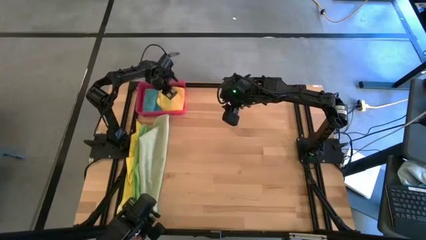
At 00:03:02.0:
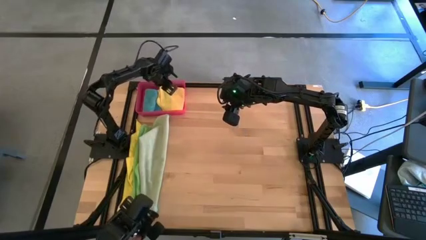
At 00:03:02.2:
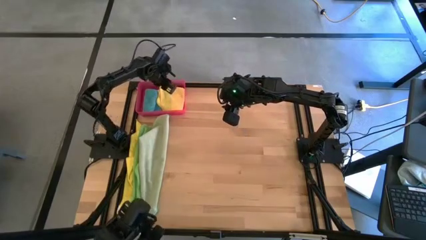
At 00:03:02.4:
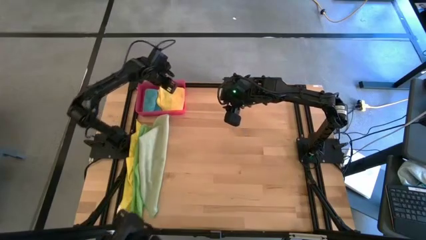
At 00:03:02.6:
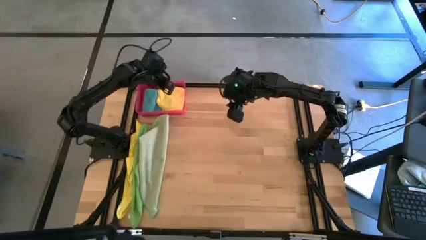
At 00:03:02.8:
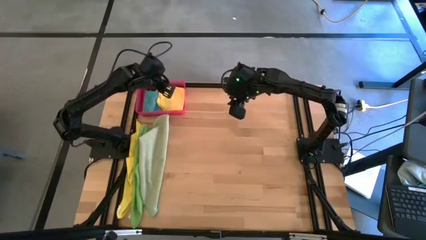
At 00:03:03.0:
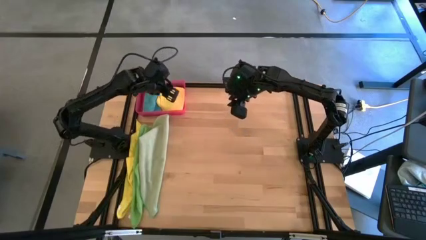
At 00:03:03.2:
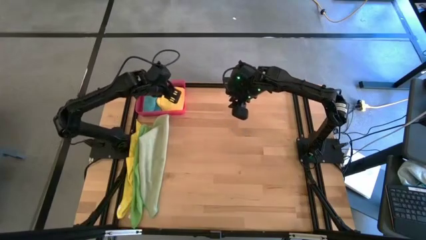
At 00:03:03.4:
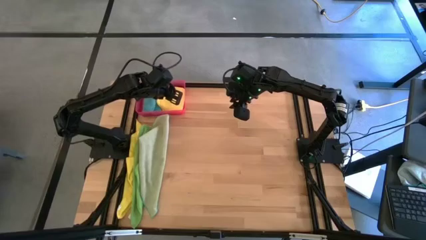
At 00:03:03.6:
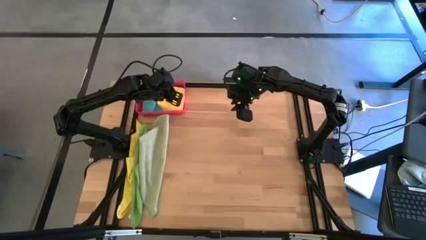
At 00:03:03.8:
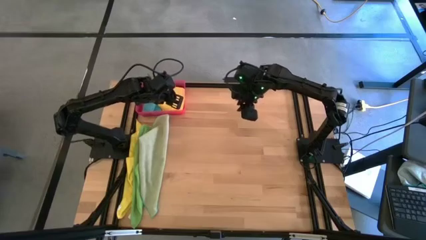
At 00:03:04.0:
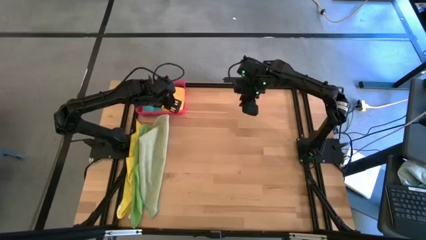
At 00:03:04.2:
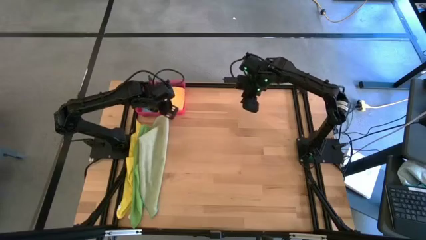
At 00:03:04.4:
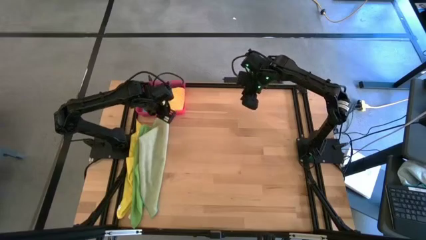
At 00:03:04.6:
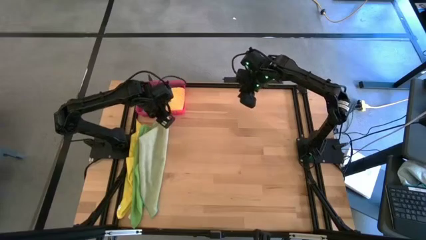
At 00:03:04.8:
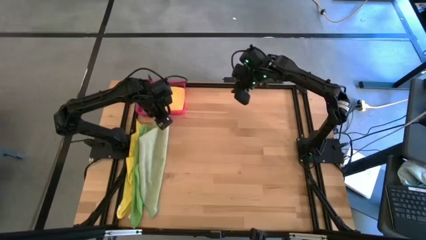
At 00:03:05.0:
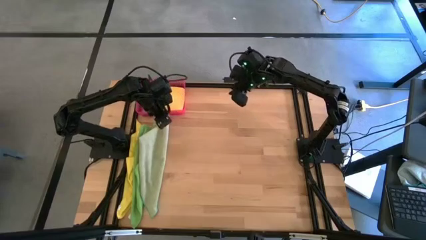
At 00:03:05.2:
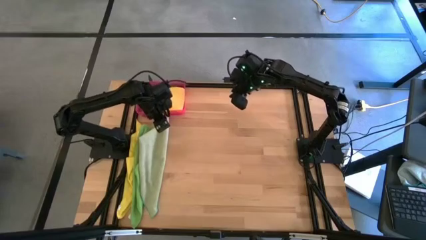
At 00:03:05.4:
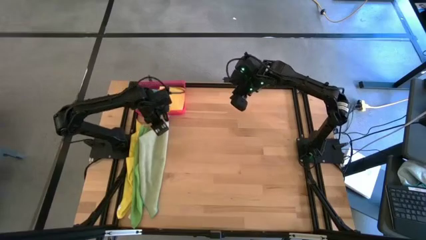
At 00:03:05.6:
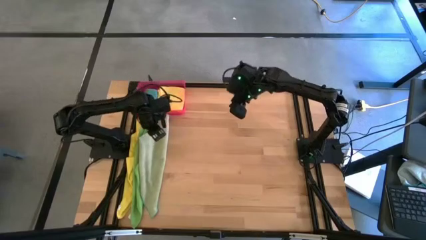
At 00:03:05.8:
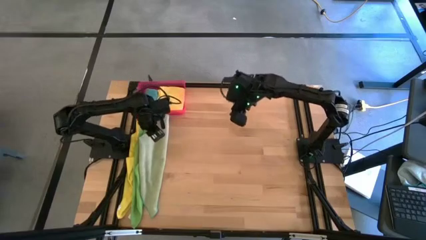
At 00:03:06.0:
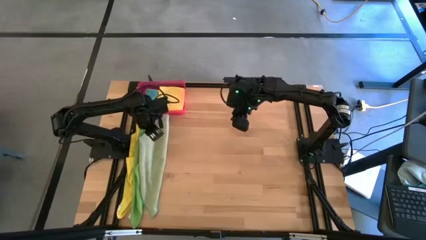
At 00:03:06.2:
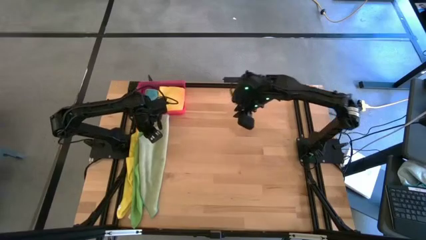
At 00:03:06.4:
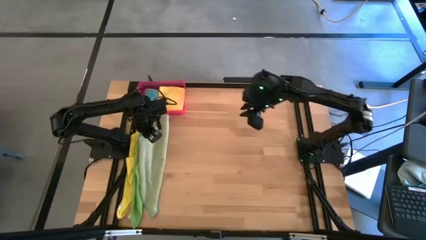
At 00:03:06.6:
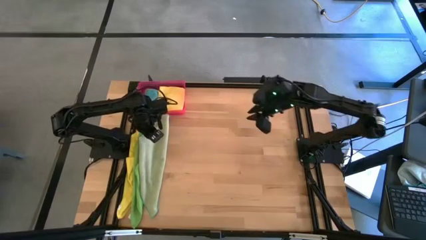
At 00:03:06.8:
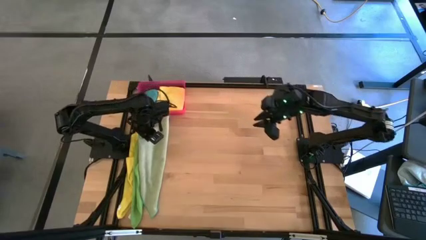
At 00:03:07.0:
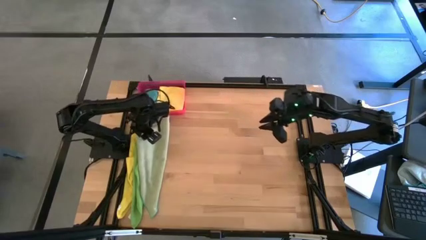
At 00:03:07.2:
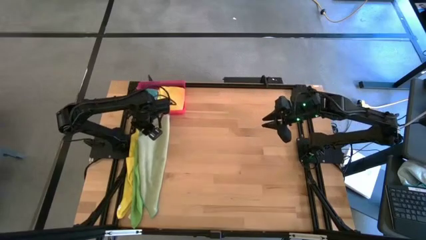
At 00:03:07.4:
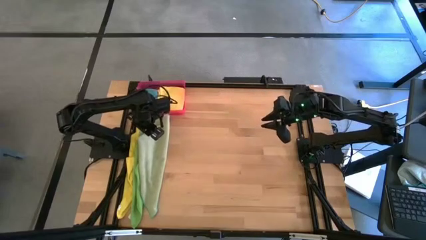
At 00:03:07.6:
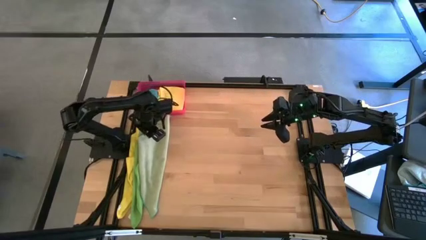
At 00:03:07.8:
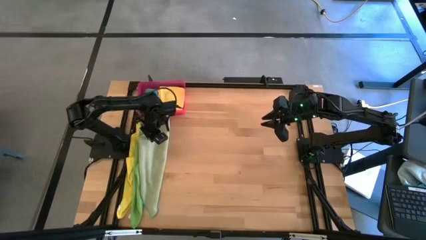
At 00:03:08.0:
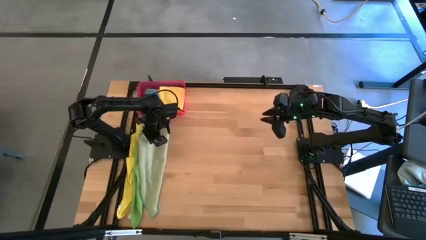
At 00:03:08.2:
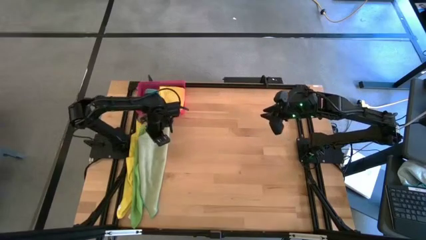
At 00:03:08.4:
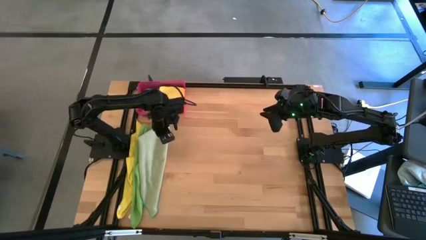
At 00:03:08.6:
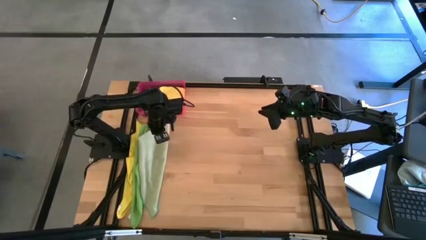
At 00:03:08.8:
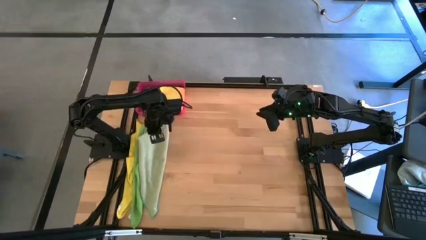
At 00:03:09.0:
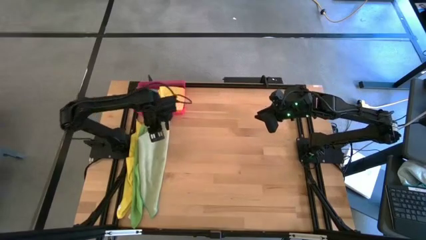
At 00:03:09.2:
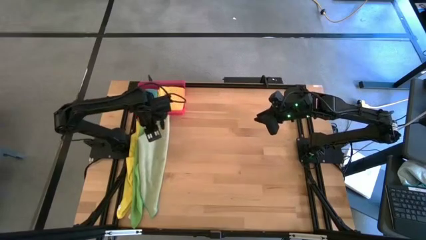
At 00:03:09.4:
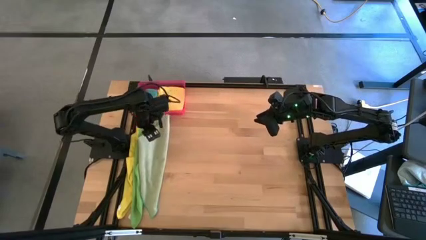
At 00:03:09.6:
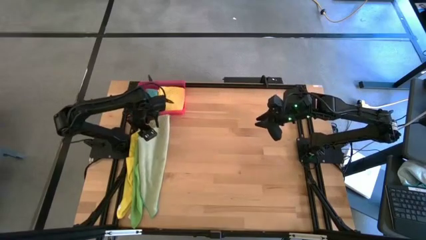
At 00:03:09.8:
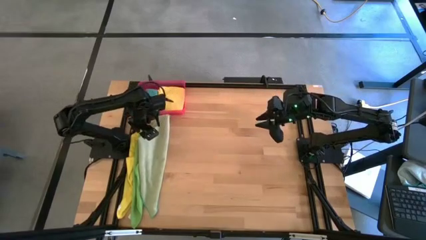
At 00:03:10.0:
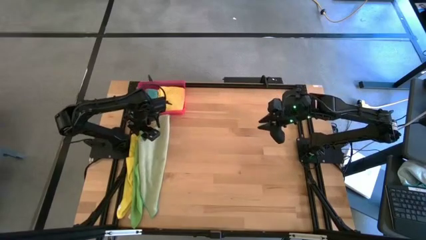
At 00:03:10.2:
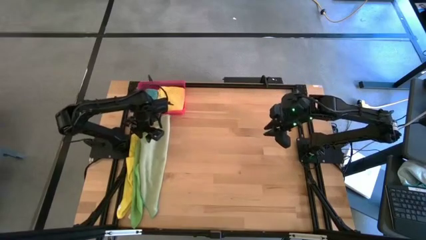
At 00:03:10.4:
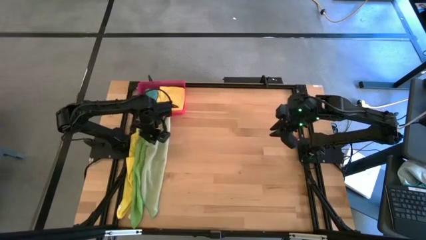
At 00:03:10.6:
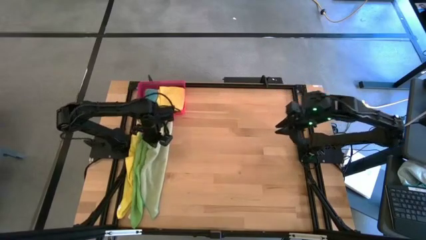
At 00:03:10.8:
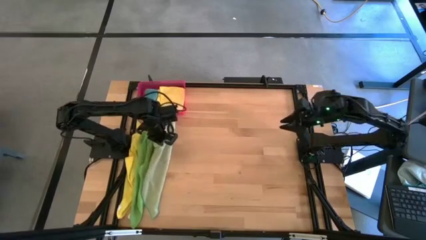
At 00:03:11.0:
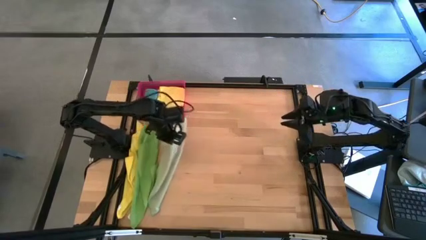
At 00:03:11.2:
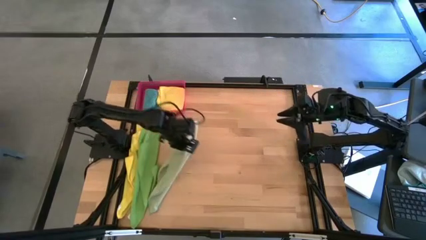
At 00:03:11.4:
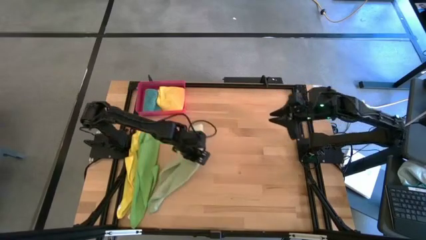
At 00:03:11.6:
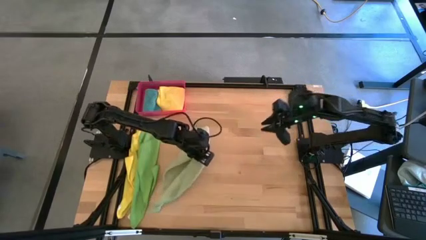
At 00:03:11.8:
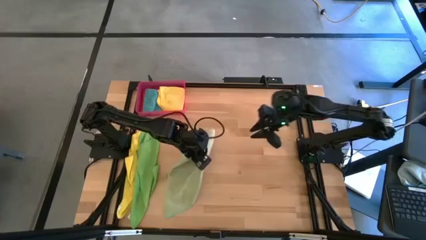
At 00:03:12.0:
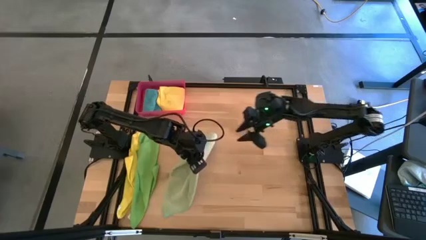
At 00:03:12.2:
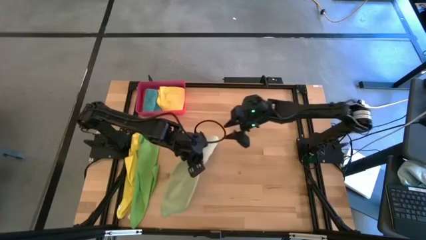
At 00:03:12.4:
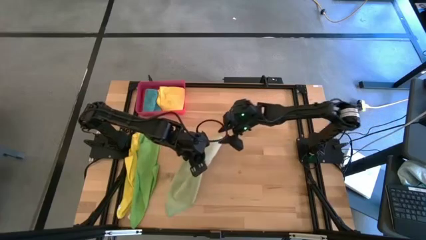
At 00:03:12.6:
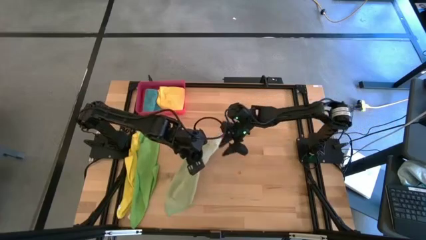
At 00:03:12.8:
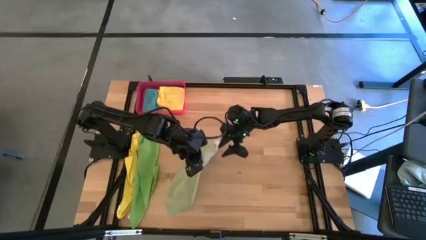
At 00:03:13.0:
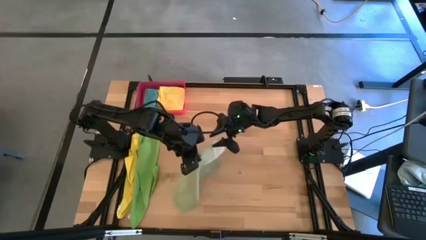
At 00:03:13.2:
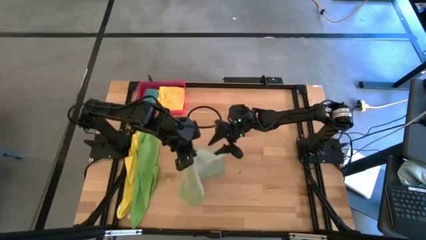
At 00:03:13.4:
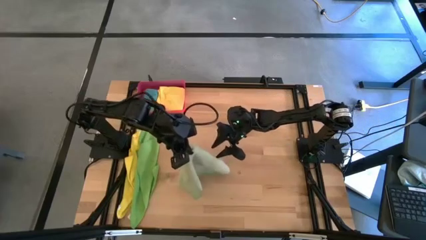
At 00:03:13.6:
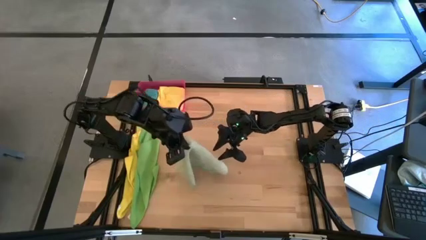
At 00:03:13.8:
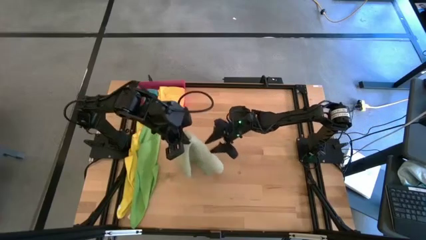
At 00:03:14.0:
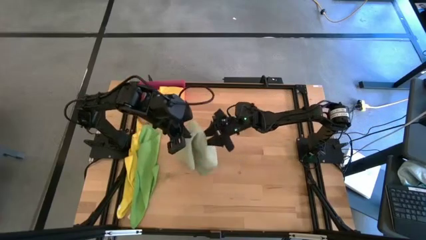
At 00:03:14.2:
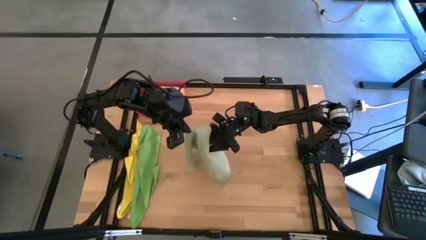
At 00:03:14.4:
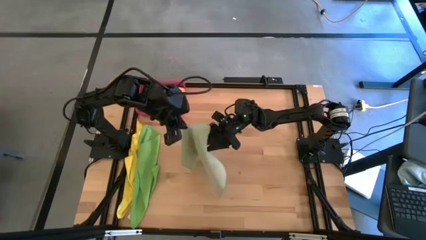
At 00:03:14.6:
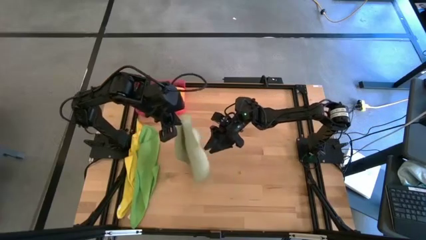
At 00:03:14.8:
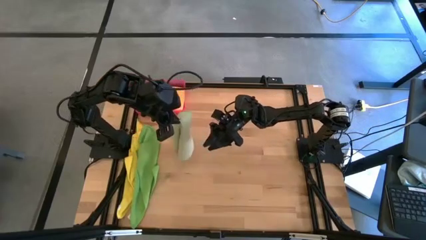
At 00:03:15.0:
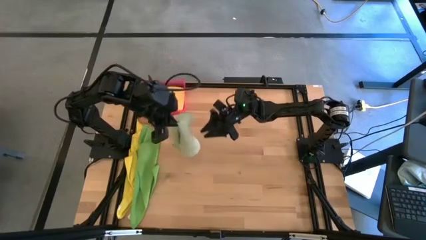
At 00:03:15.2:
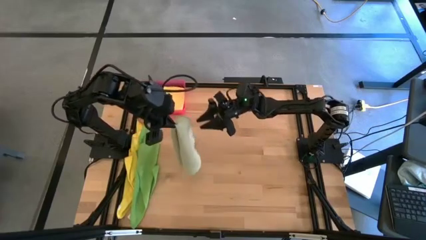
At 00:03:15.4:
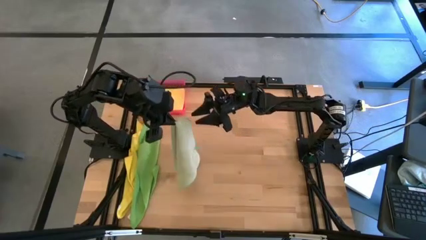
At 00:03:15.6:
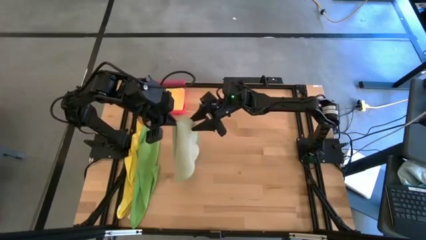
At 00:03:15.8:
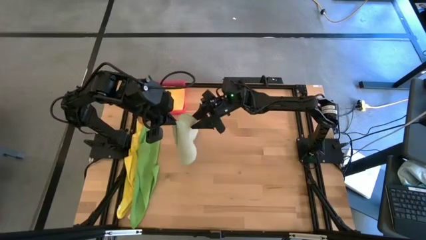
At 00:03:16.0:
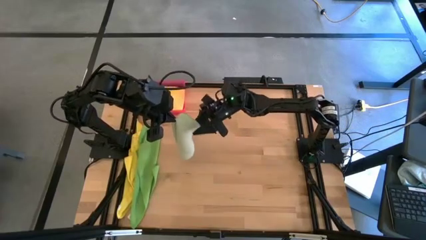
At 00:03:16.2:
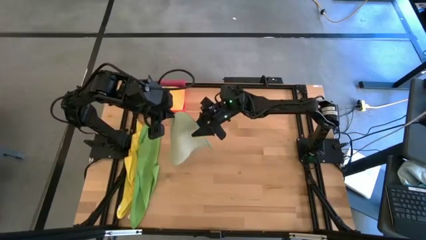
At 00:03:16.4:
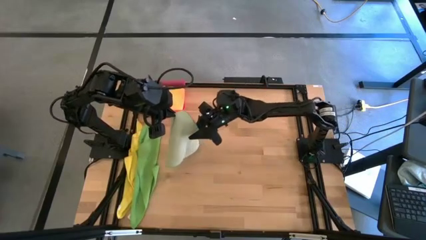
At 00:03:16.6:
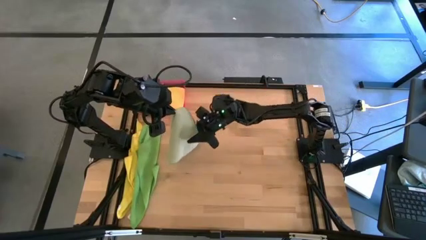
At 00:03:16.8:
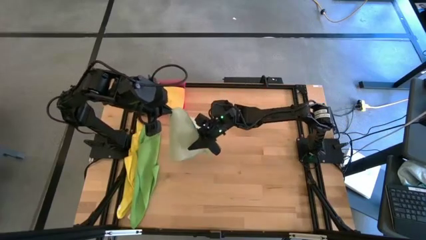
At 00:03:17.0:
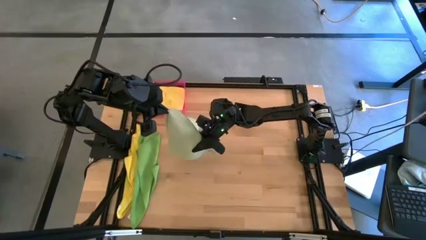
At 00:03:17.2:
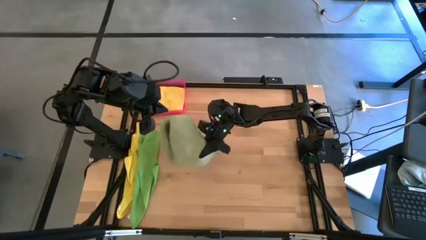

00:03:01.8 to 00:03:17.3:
Task: Fold microfiber towels
Fold the light green microfiber towel
